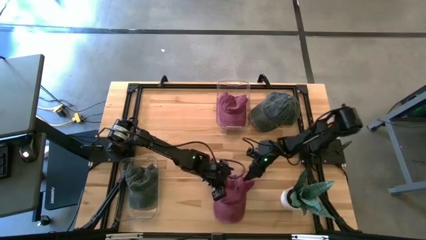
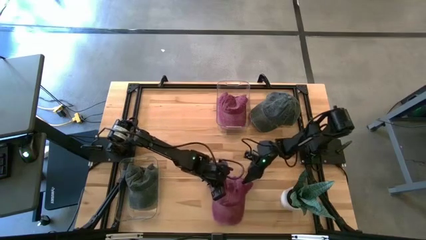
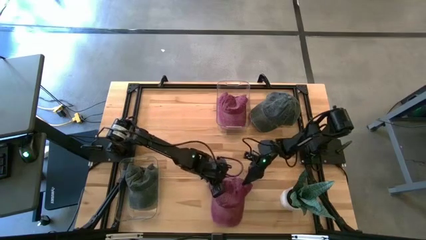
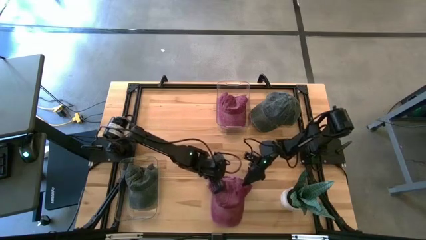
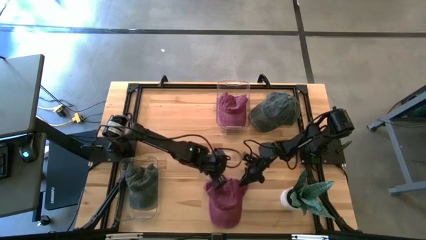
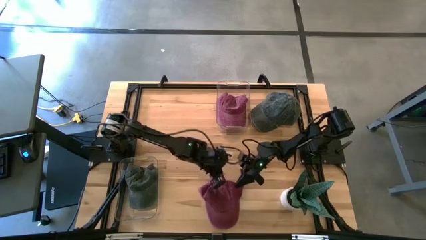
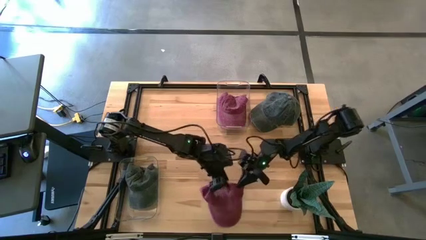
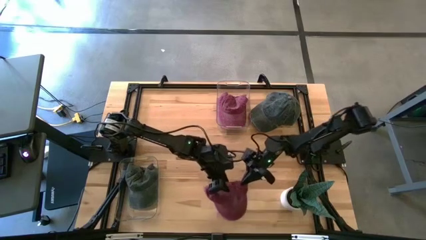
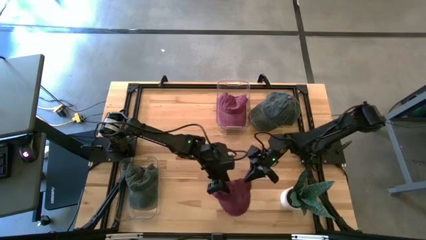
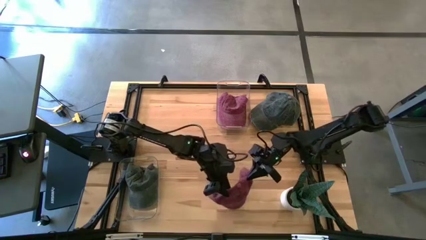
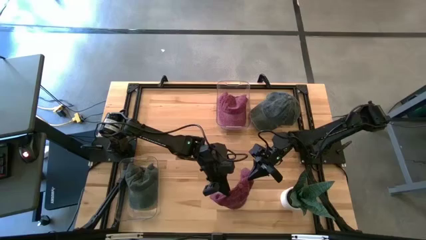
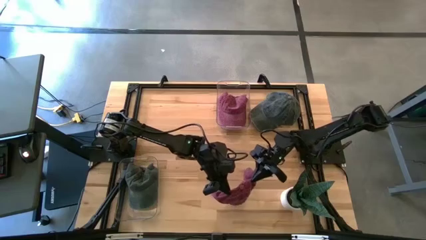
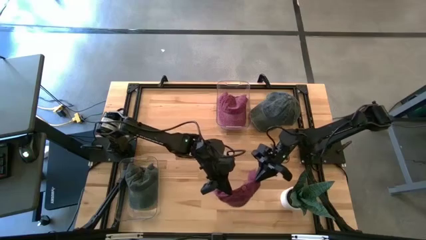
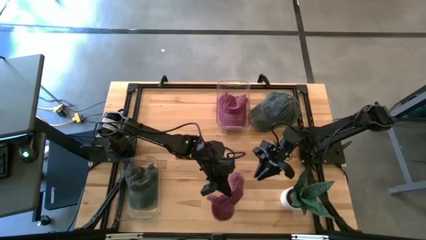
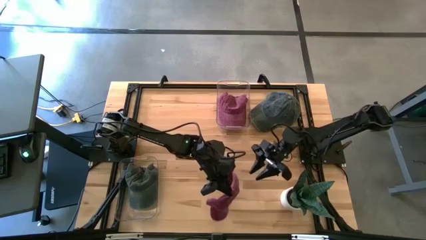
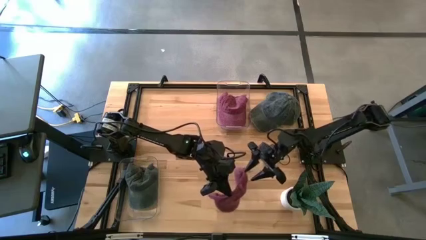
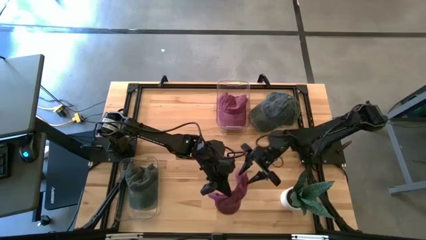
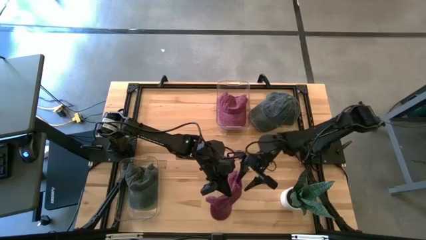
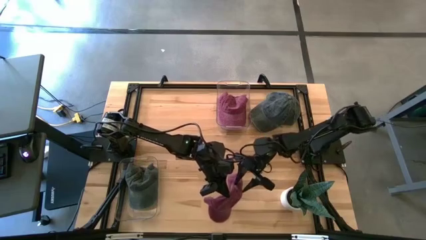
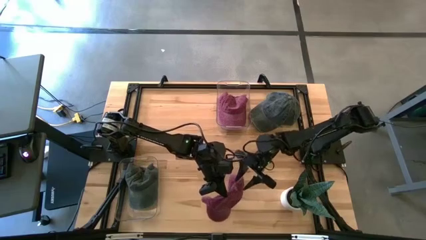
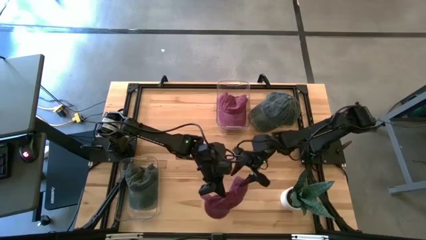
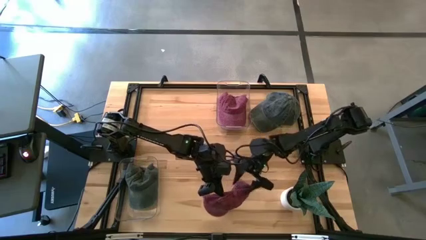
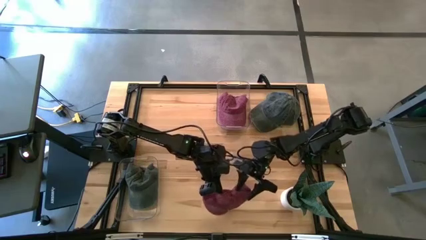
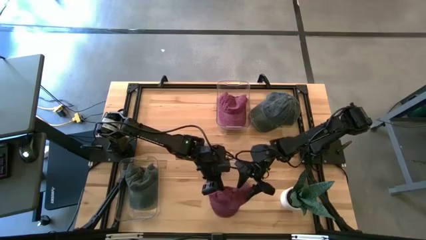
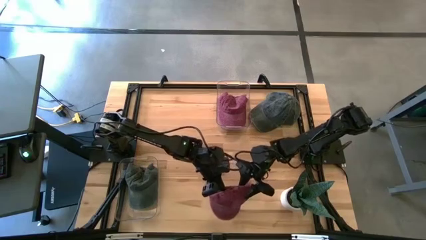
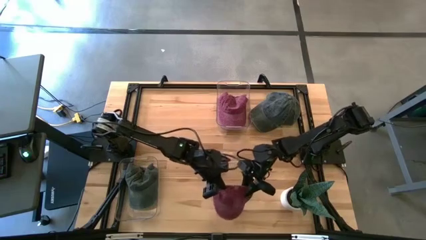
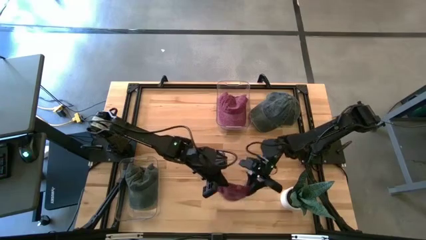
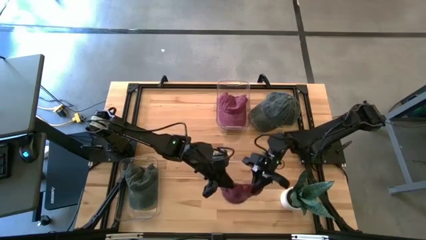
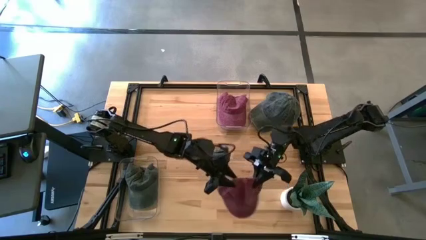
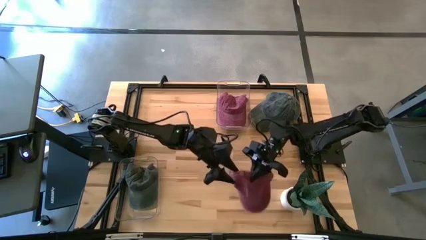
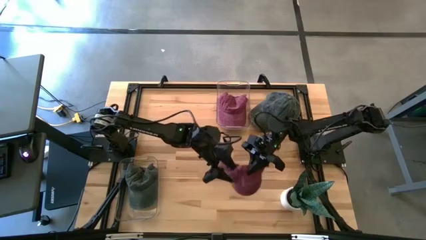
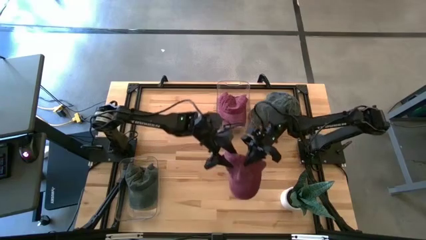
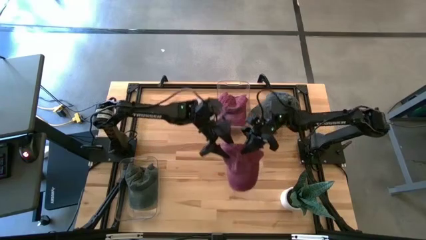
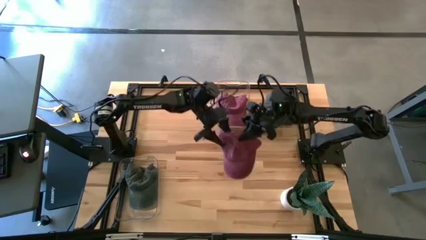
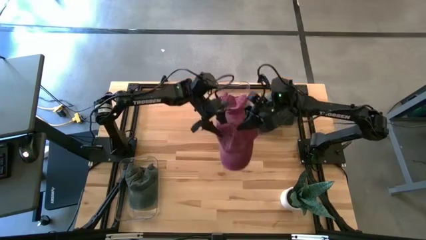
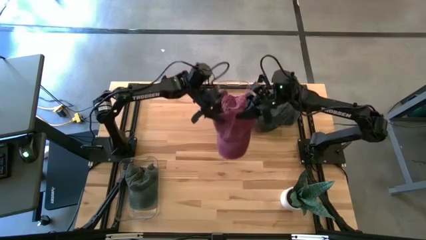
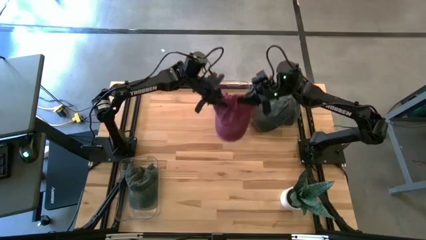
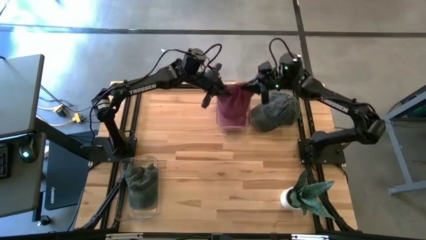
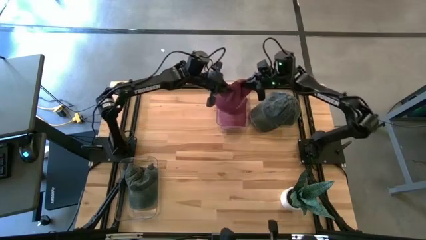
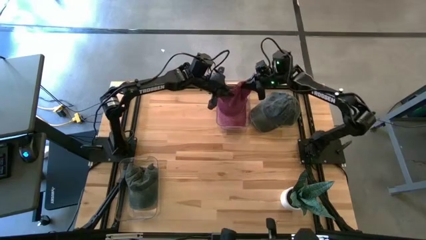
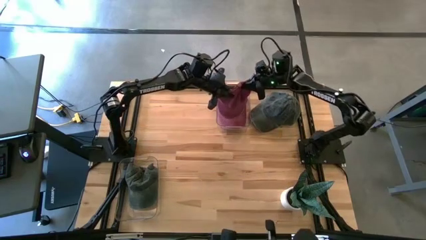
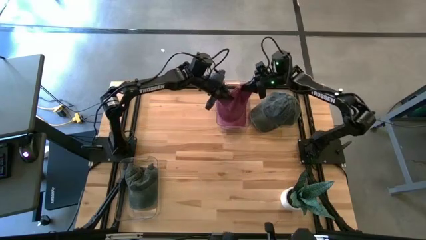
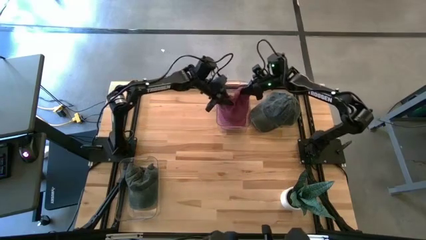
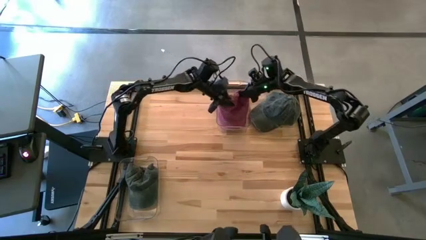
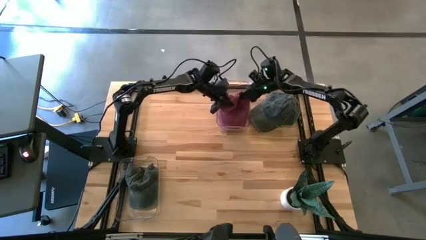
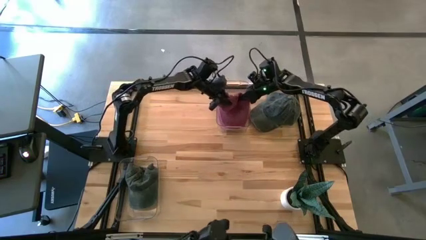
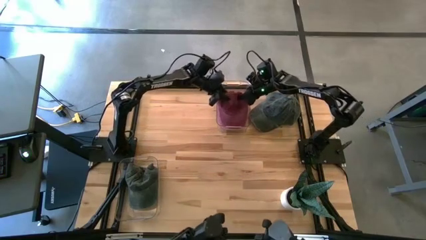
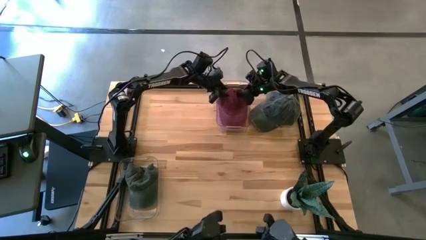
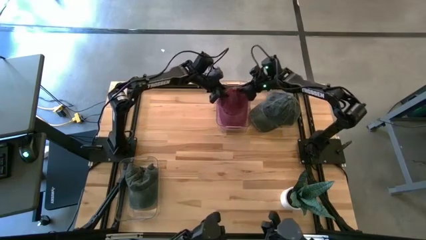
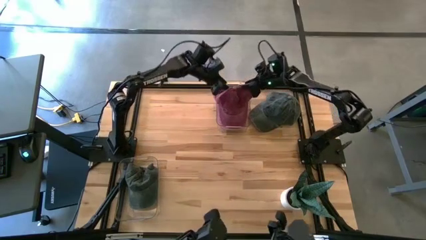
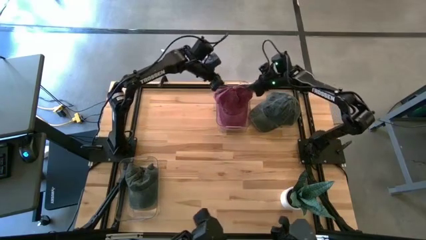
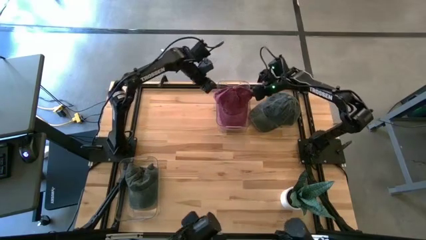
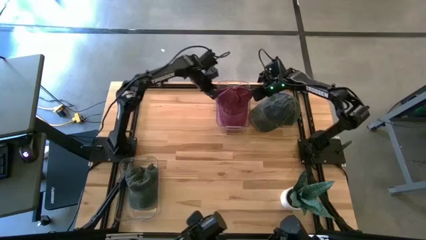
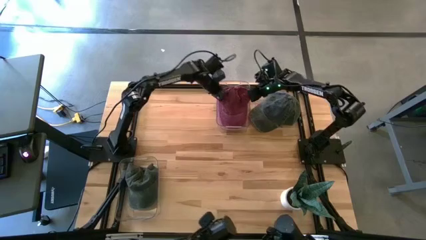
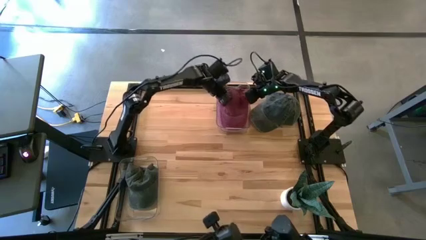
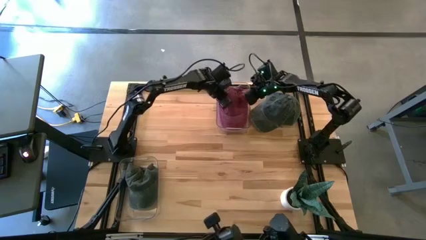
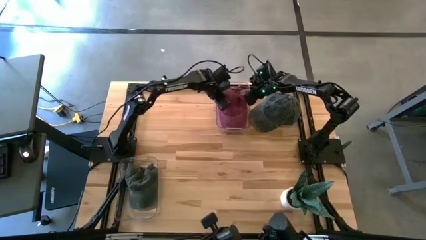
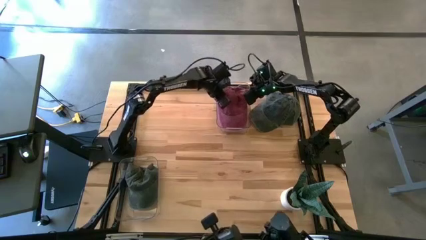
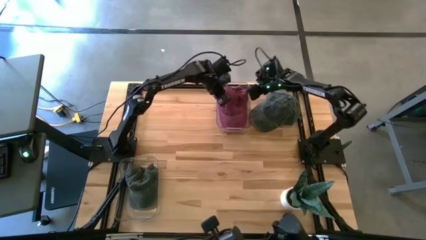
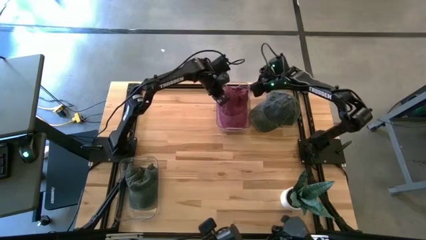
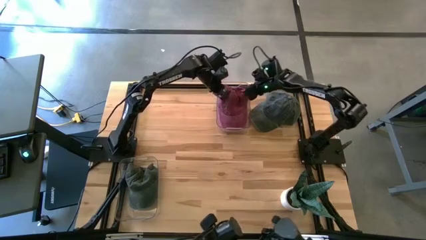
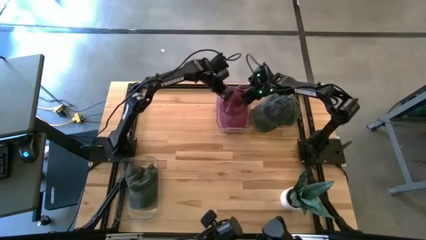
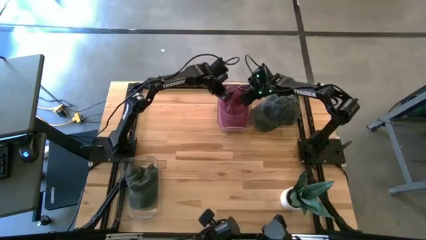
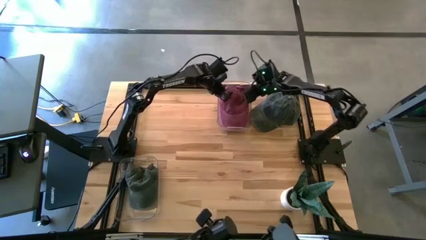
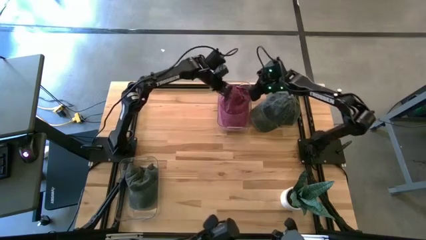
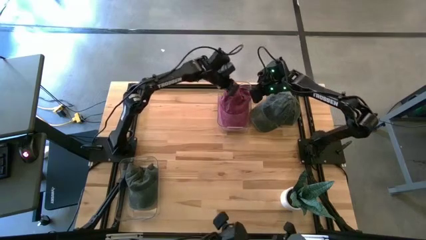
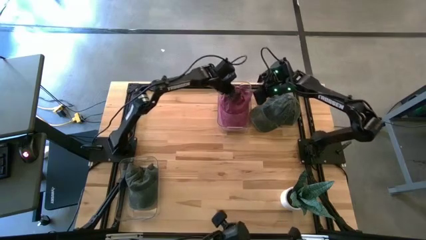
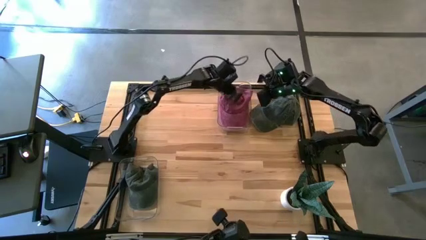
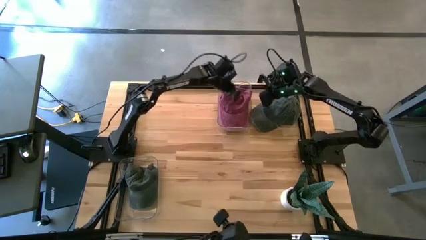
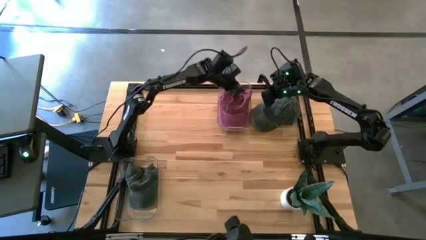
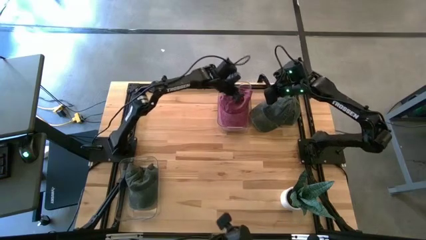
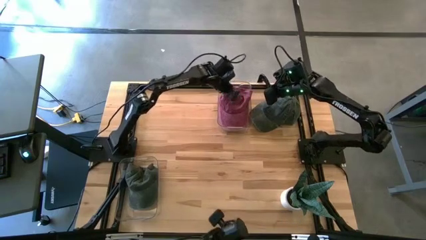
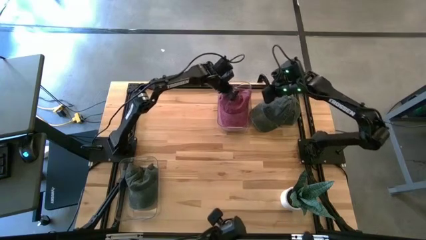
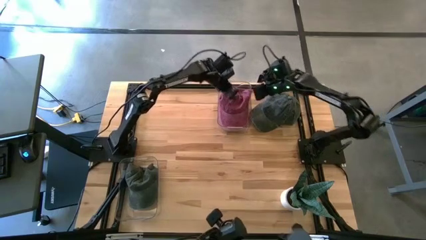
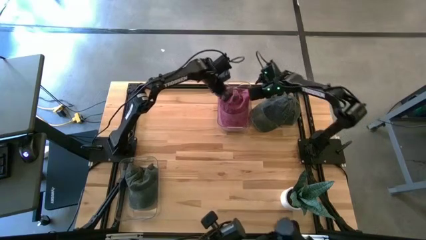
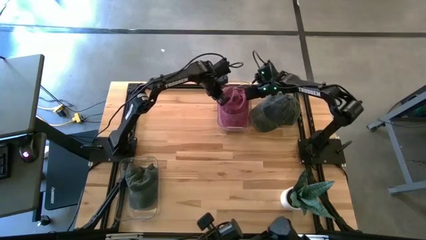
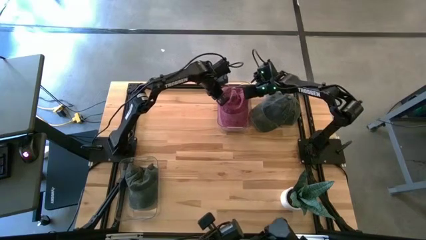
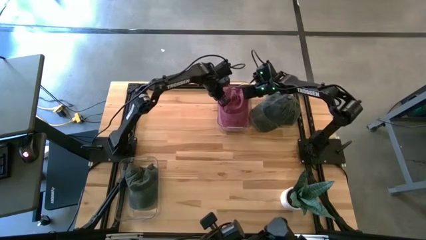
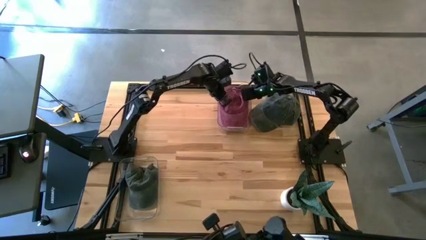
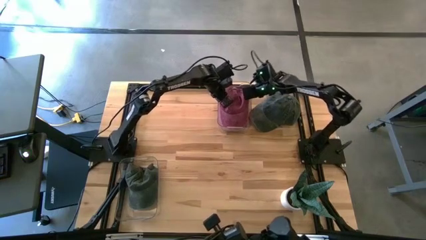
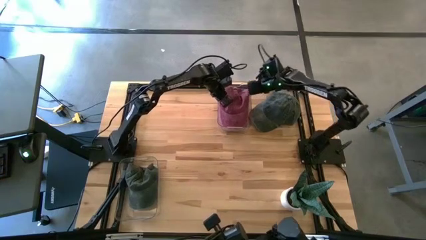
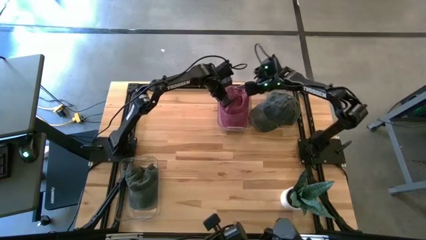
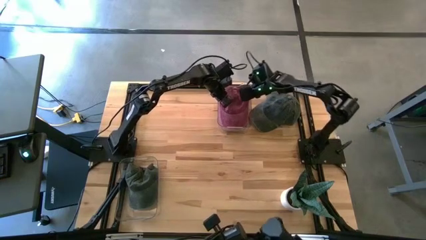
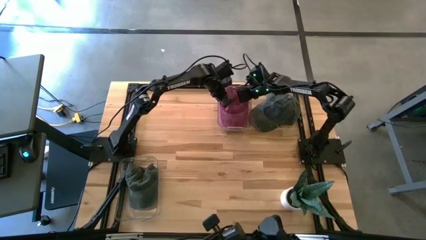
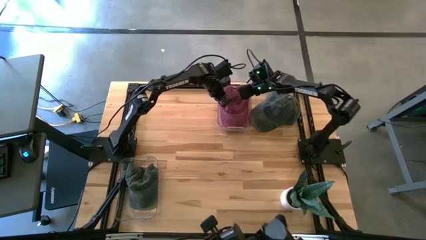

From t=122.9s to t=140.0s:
Task: Pick & Place hat
Put the maroon cap into the top transparent bin
